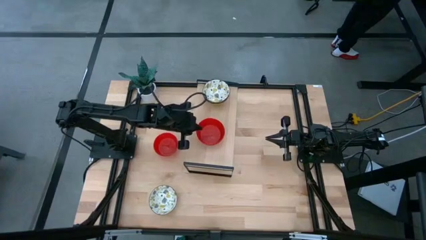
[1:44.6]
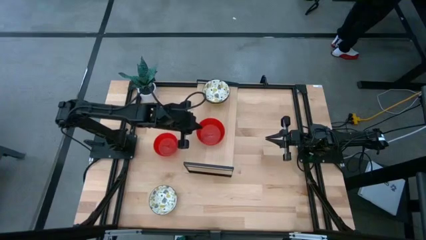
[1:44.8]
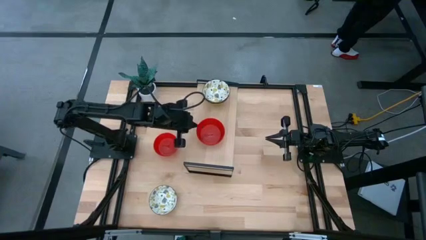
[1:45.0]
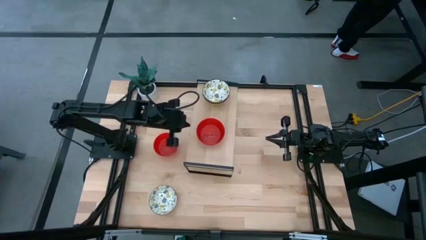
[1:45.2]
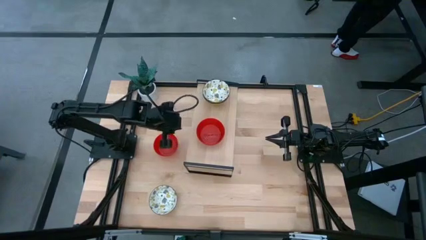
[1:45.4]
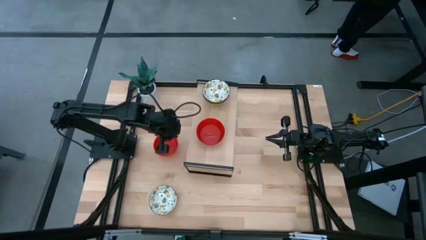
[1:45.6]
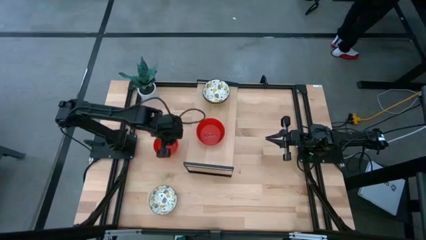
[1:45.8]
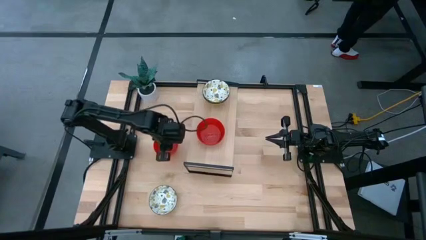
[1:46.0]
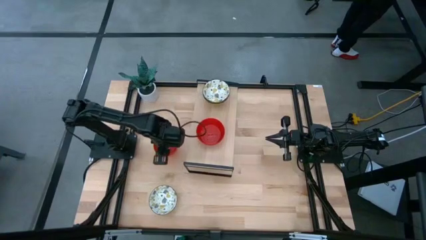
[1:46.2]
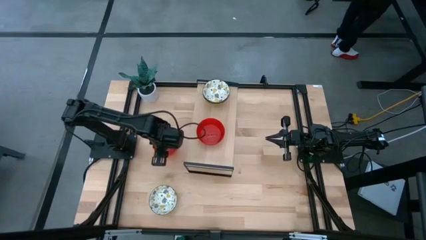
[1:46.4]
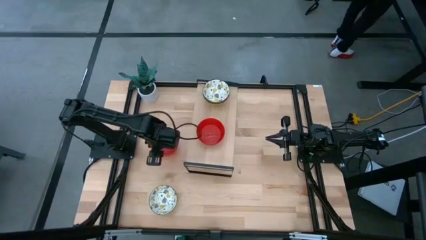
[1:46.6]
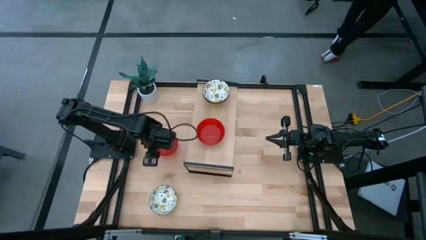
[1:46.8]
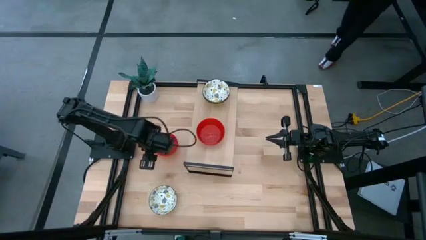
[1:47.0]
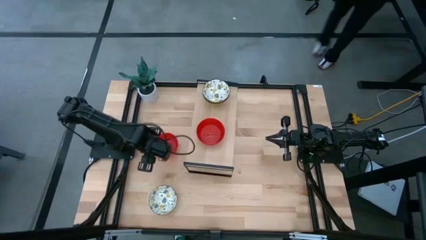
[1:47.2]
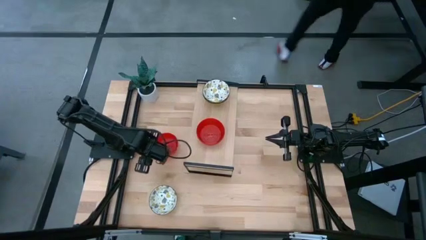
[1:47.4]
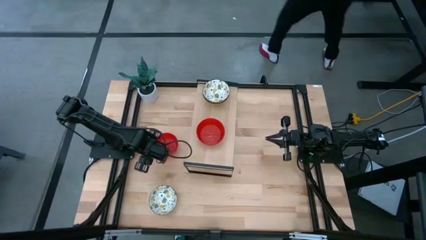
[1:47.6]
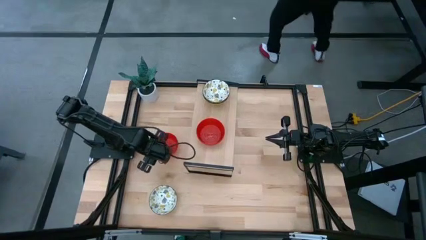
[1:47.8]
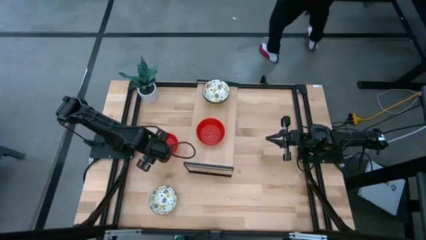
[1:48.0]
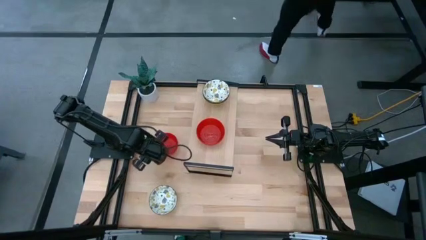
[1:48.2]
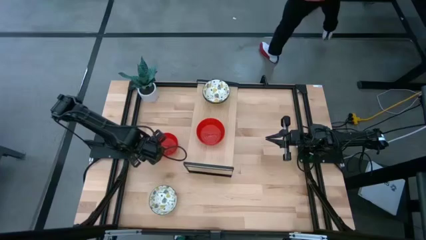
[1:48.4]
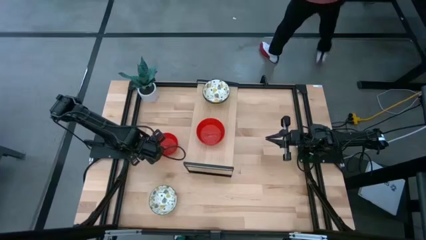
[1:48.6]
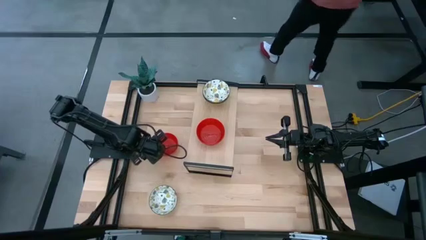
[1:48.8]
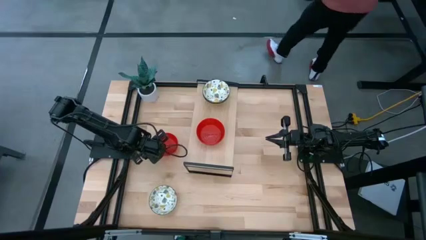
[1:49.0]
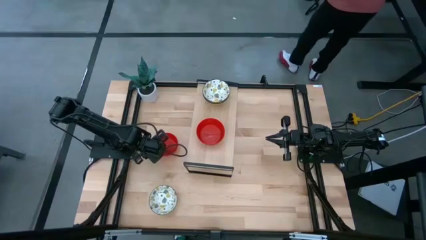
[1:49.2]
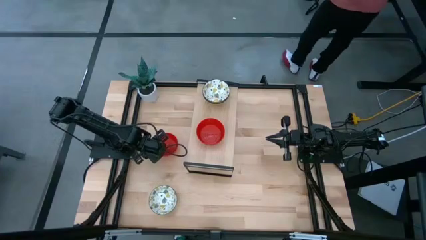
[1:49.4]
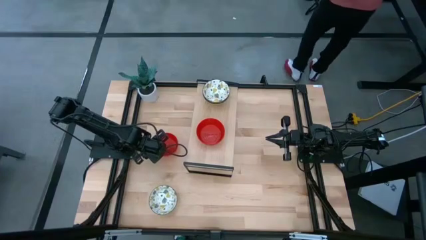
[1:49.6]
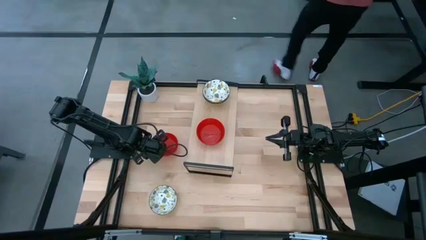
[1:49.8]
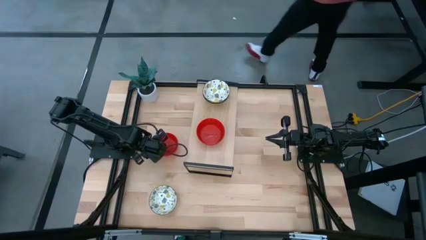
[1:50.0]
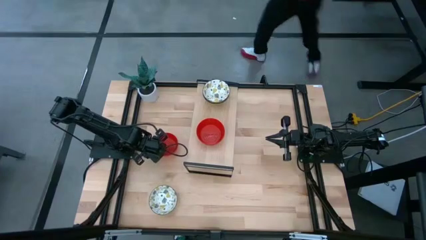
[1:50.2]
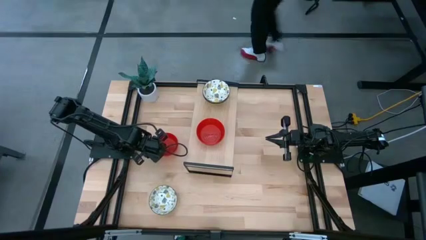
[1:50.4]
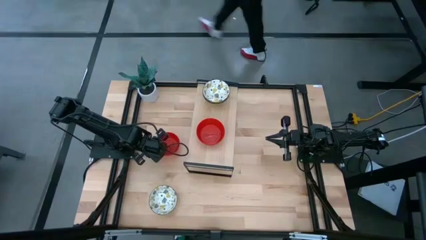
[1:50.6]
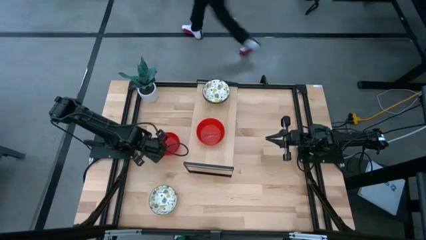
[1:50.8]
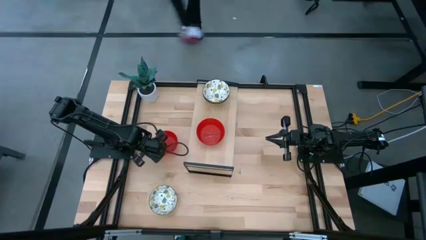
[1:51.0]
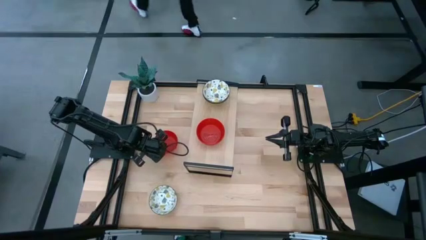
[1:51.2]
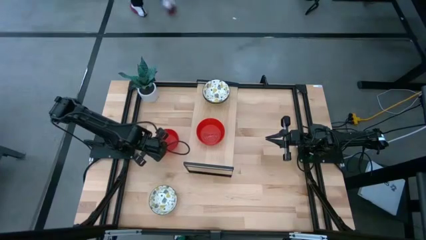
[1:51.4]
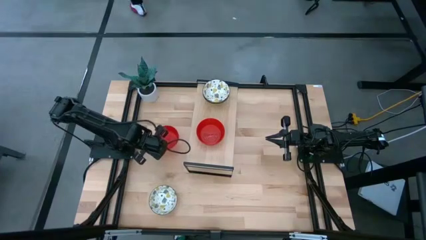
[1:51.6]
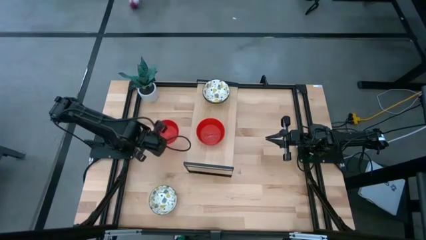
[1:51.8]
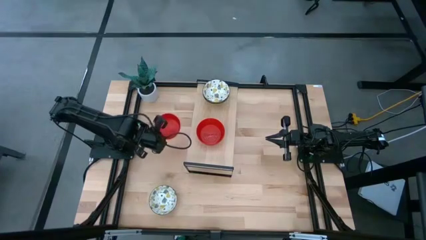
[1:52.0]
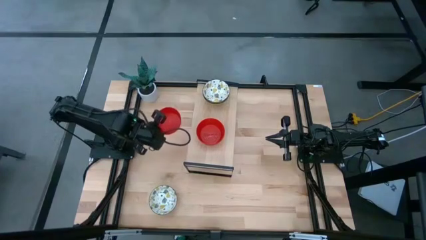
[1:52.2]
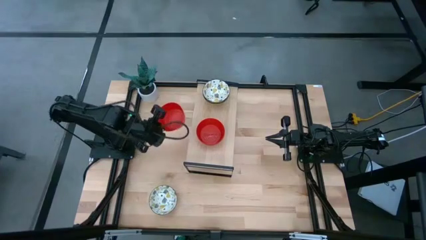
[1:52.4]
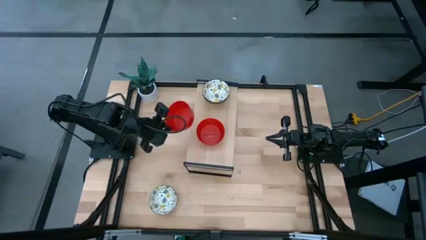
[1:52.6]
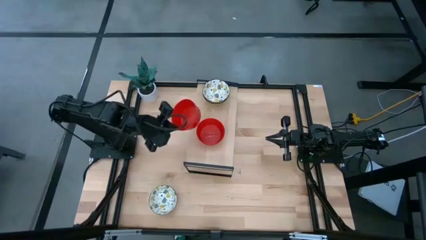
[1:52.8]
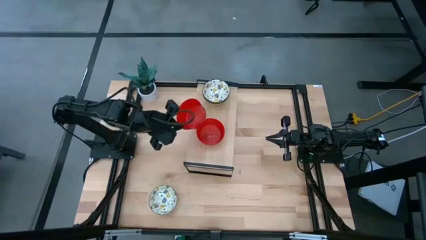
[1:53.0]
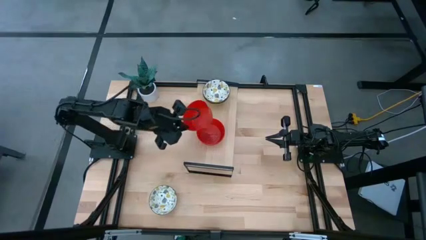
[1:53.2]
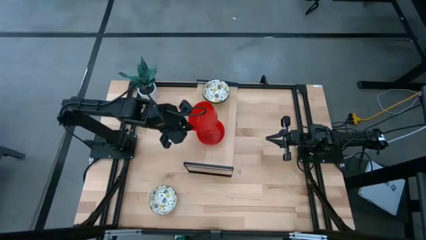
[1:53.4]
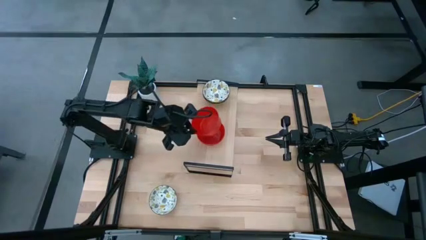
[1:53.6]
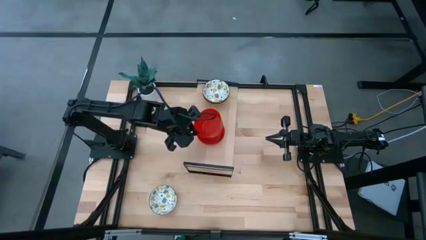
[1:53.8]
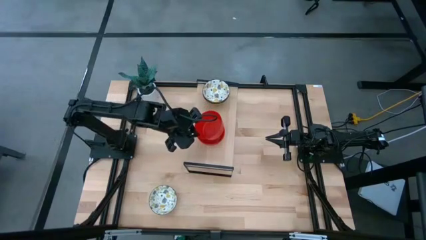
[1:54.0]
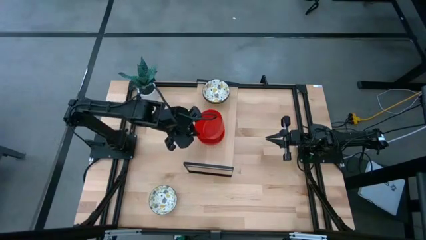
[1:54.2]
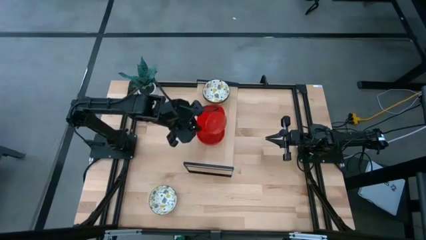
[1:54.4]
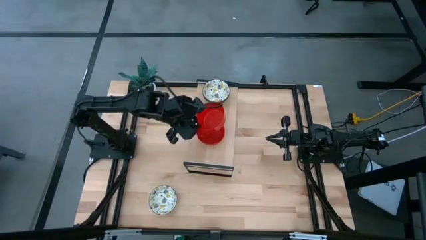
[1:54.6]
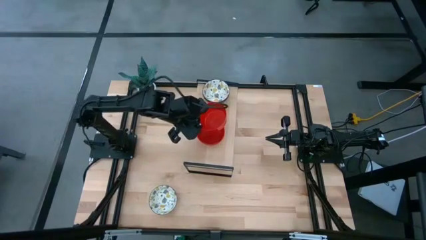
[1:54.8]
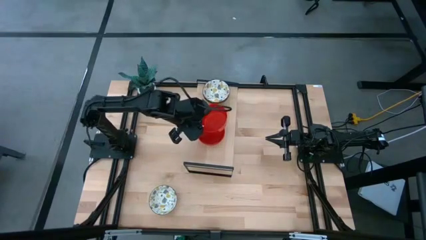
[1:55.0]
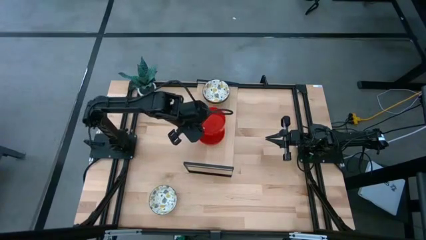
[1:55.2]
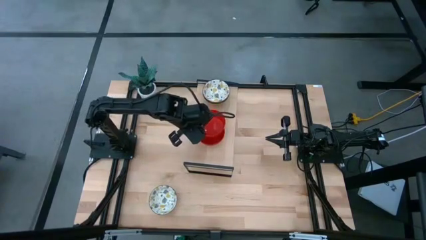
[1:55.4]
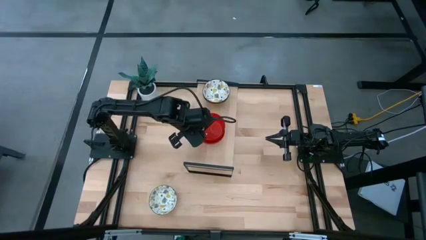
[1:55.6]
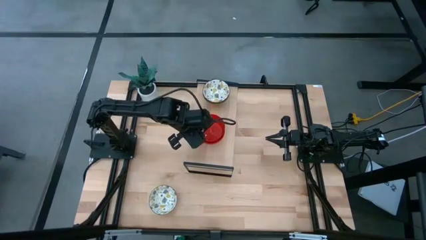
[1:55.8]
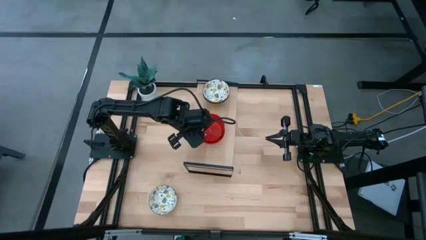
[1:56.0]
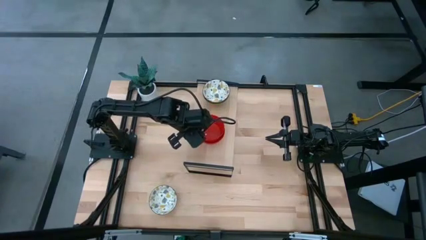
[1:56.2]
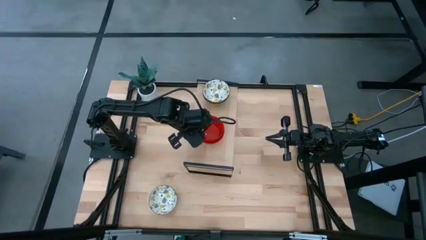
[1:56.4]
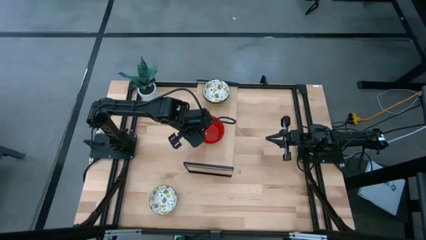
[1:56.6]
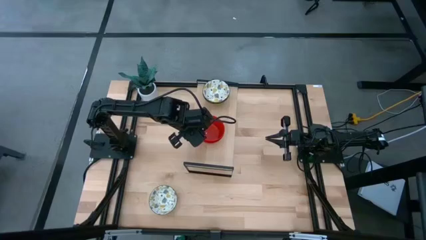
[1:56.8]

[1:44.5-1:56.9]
Task: Pick & Place Mini bowls
Stack the red bowl on top of the red bowl on the shelf

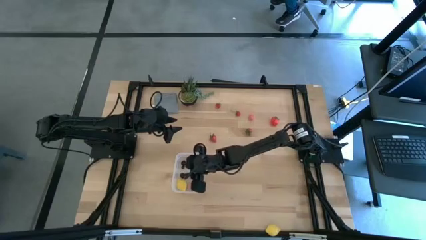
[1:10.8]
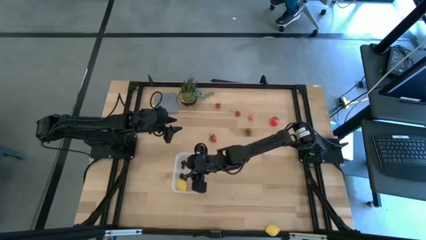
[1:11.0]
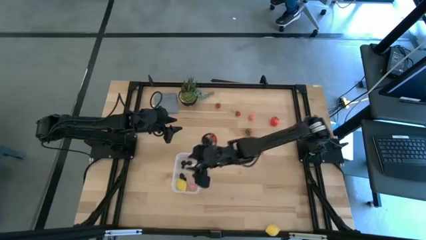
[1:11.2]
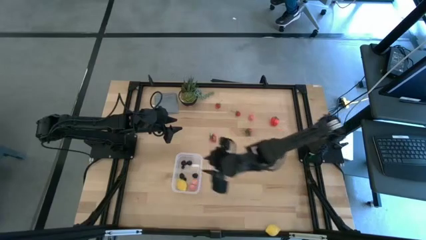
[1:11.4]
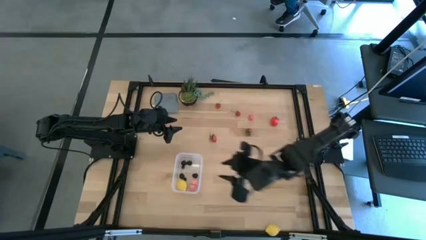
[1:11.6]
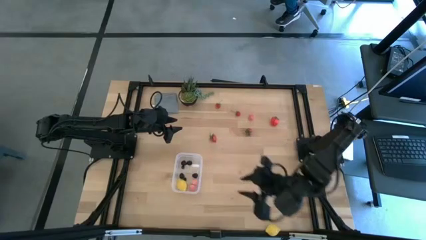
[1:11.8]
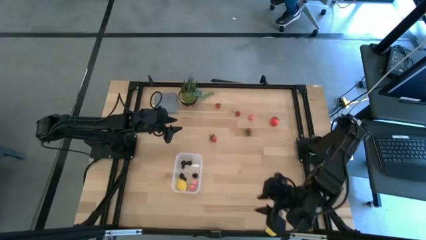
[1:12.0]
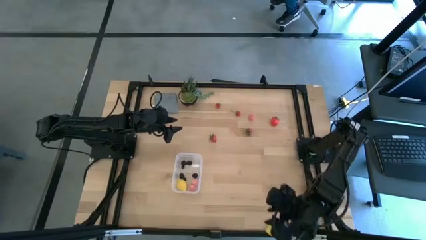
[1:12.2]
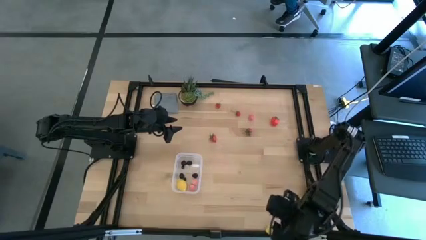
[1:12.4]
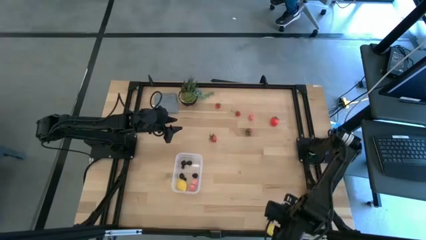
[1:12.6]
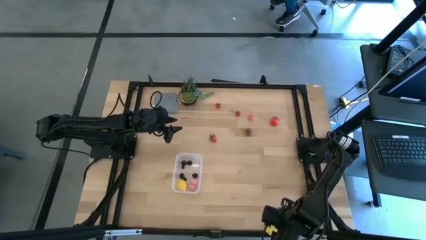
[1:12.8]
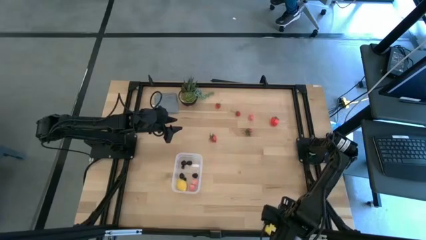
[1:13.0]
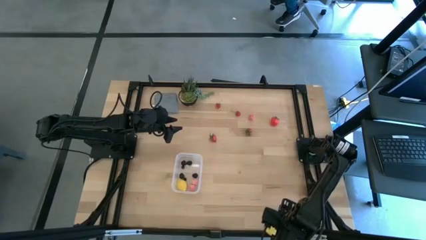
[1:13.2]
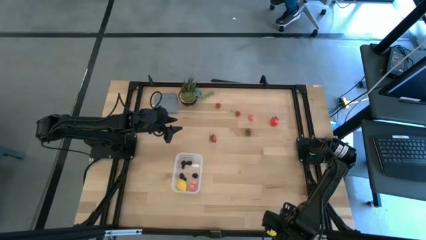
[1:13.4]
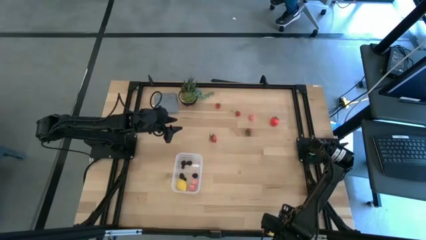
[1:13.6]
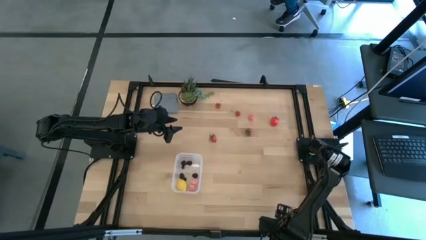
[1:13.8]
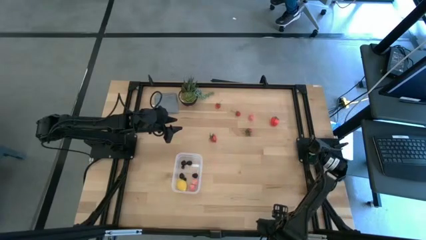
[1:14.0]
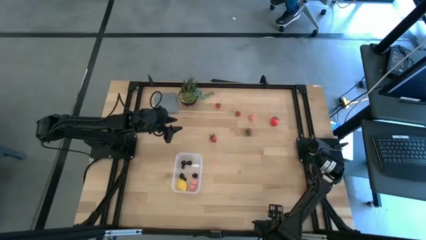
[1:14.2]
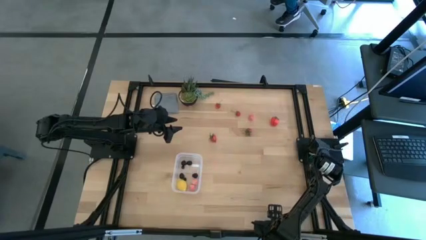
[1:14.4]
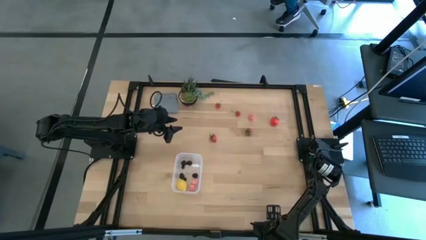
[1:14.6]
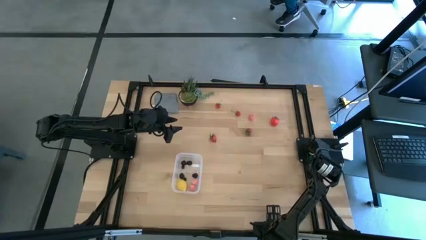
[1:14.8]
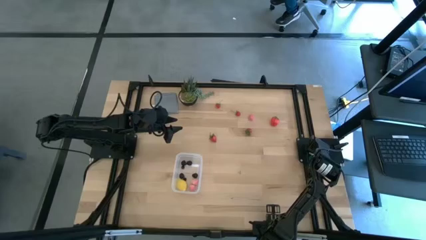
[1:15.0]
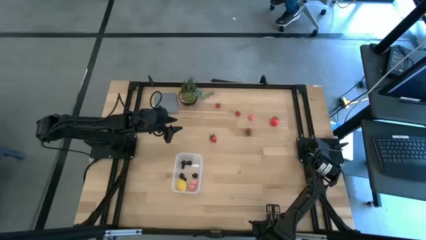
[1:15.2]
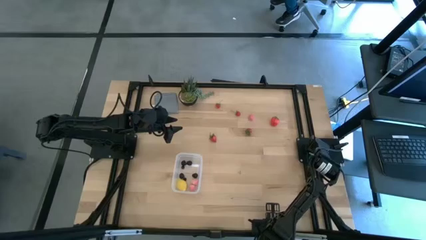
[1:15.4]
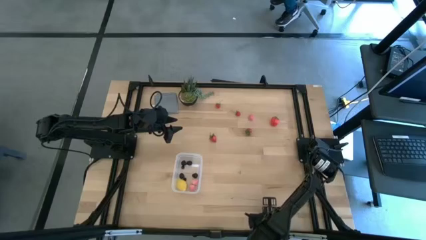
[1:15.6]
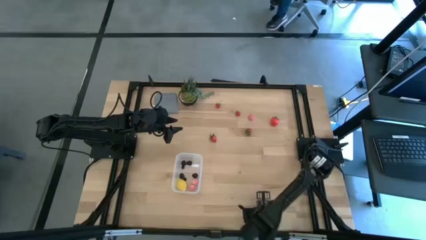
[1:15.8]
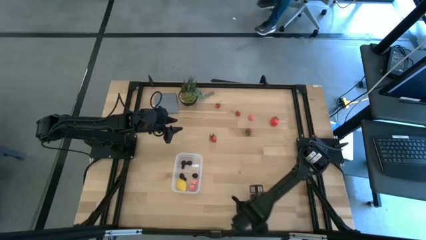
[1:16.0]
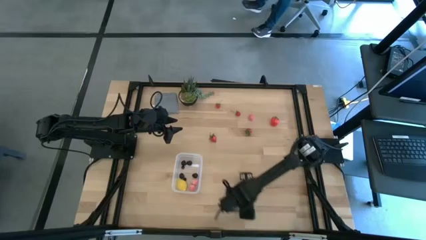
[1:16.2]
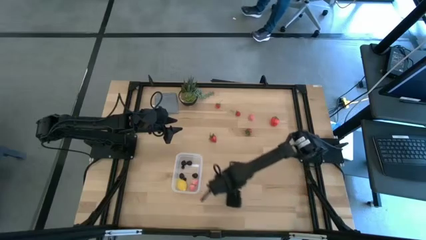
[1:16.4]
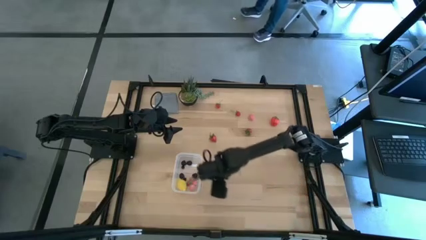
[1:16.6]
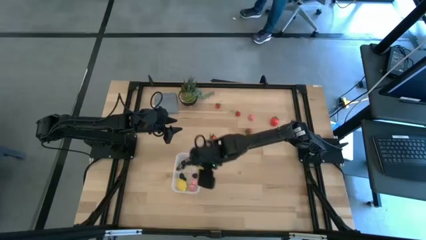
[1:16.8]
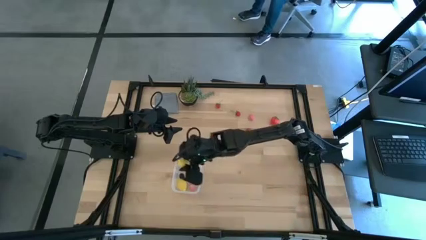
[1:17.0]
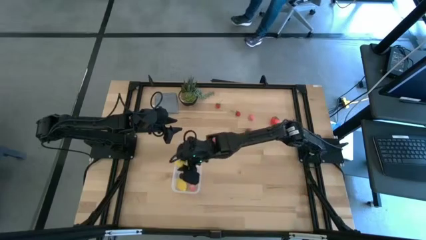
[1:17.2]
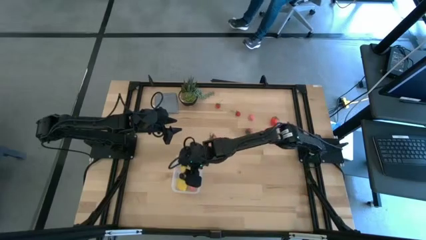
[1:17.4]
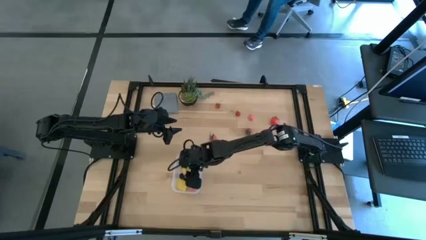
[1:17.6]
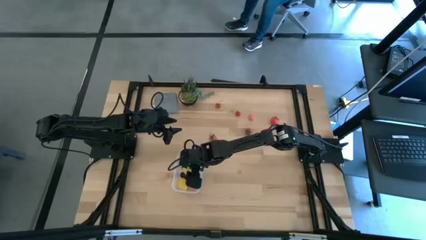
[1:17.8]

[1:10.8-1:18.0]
Task: Pick and placing Produce into tupperware
Put the yellow lemon into the transparent bin
